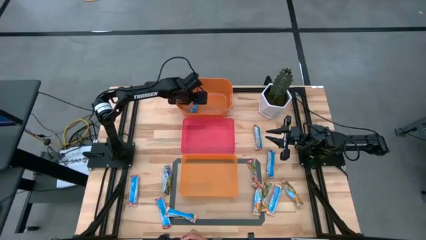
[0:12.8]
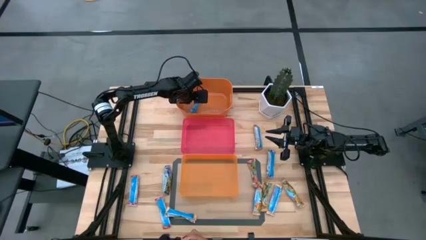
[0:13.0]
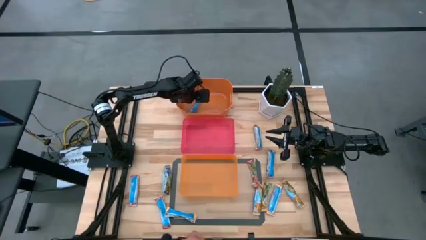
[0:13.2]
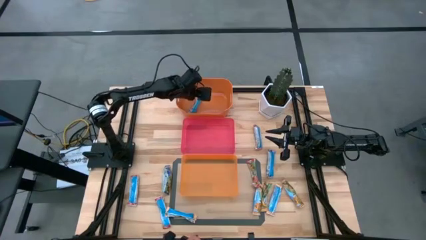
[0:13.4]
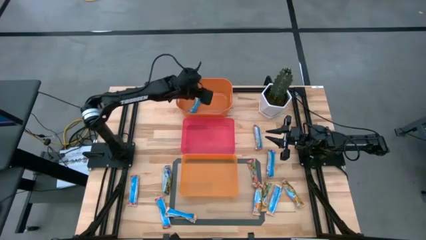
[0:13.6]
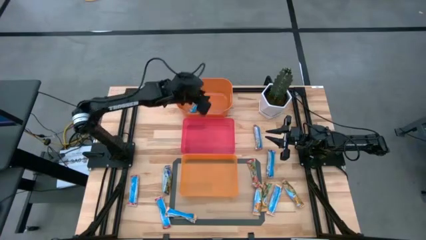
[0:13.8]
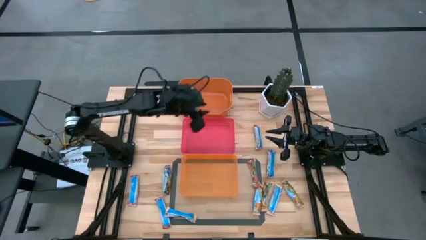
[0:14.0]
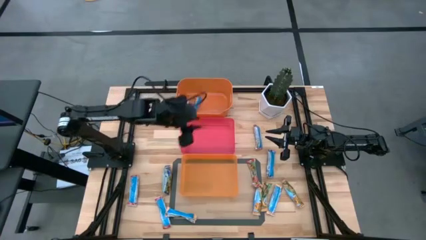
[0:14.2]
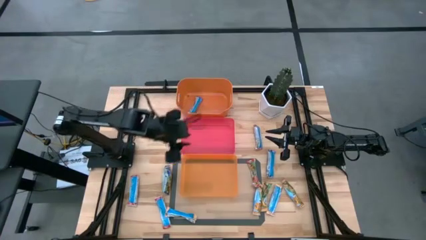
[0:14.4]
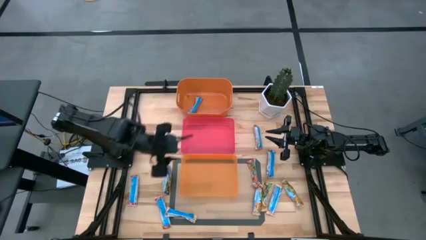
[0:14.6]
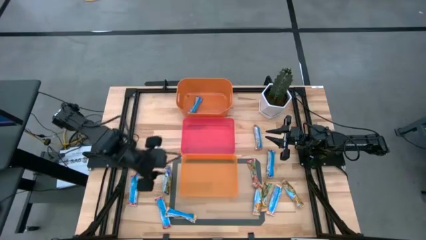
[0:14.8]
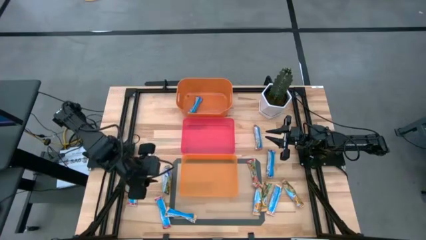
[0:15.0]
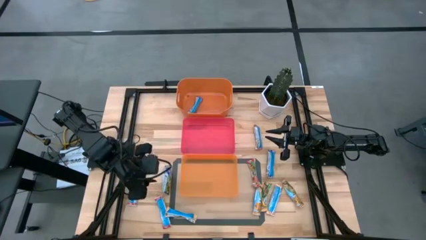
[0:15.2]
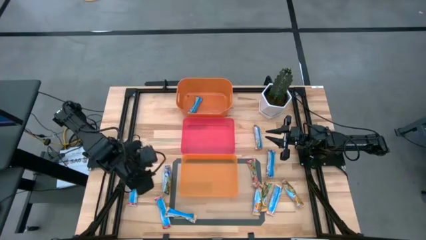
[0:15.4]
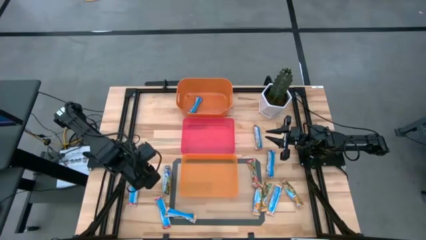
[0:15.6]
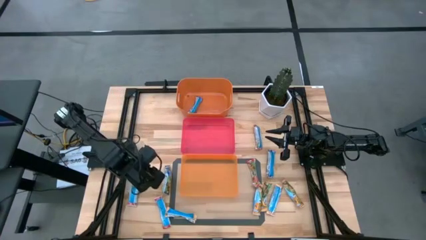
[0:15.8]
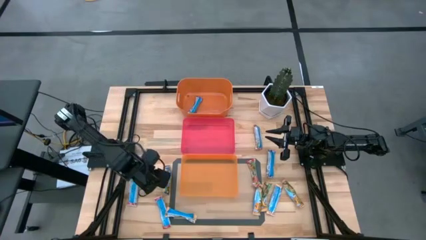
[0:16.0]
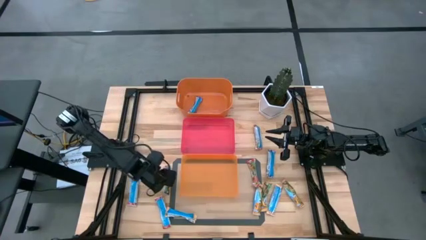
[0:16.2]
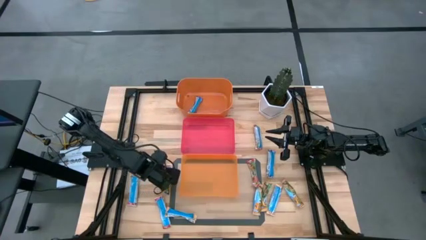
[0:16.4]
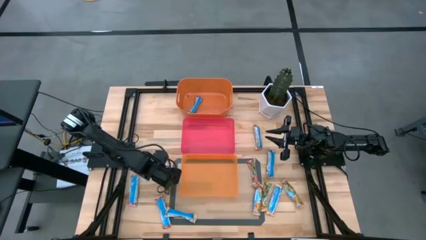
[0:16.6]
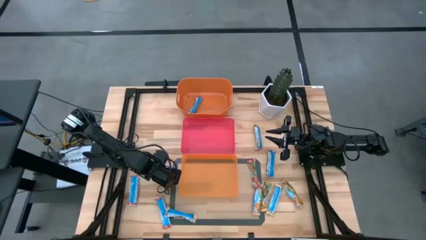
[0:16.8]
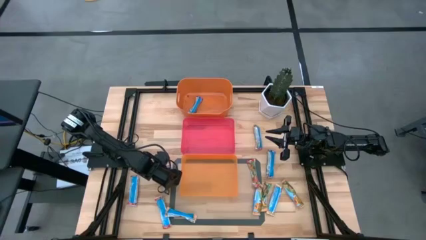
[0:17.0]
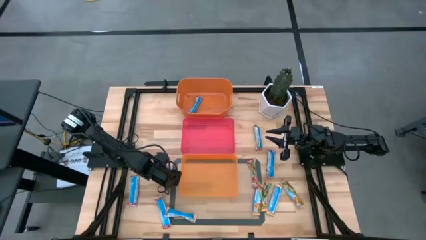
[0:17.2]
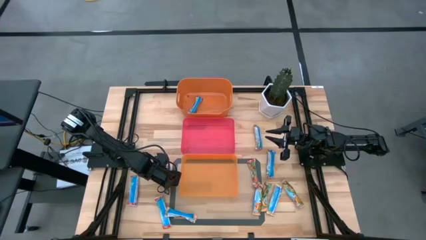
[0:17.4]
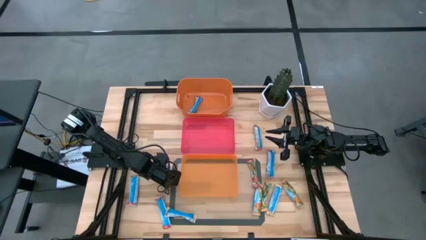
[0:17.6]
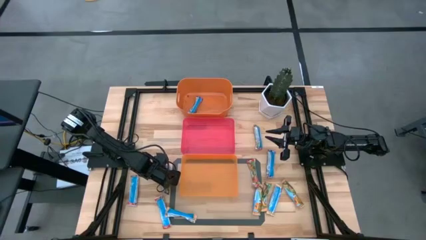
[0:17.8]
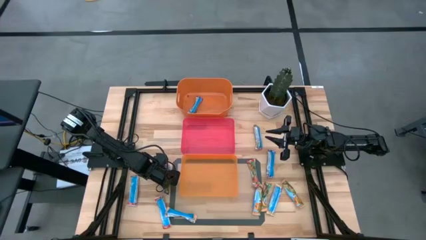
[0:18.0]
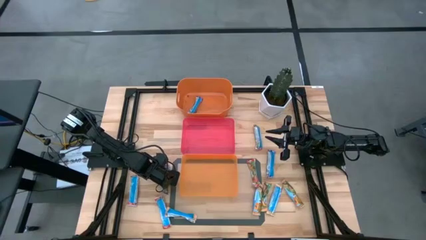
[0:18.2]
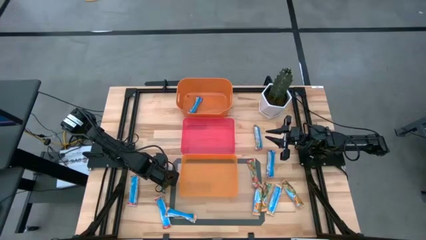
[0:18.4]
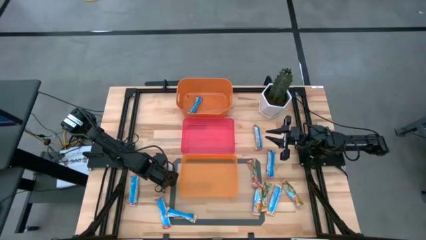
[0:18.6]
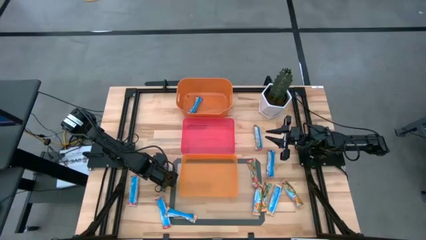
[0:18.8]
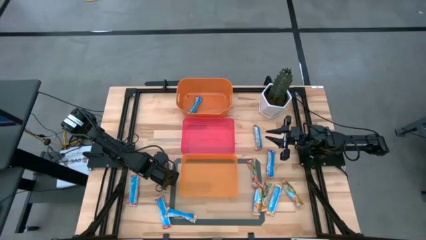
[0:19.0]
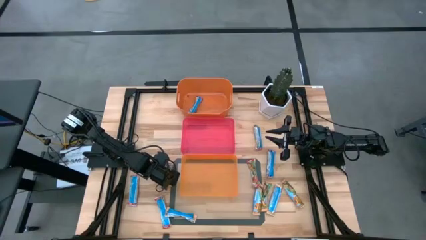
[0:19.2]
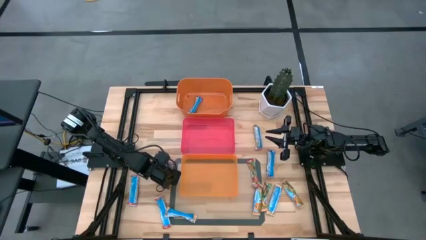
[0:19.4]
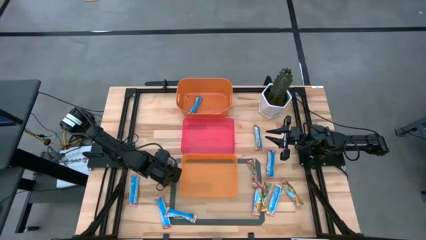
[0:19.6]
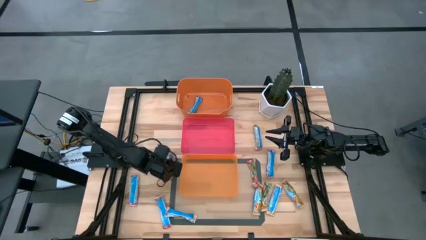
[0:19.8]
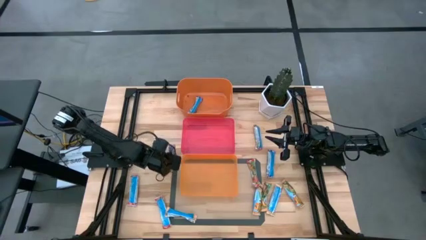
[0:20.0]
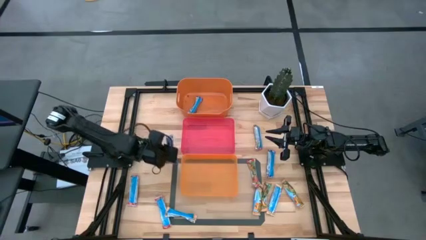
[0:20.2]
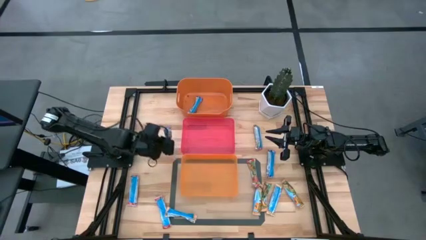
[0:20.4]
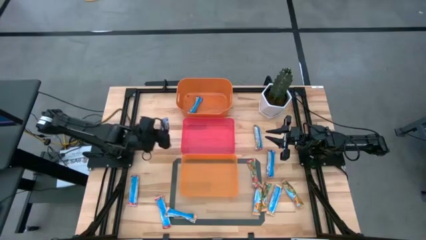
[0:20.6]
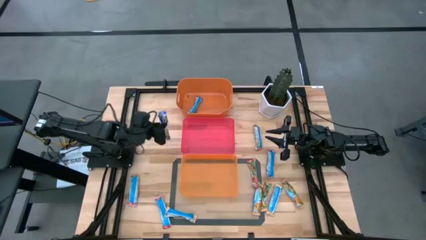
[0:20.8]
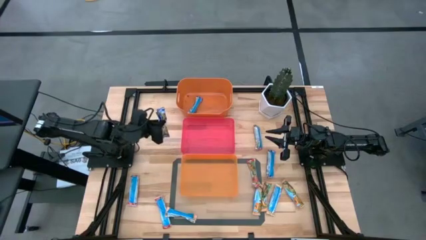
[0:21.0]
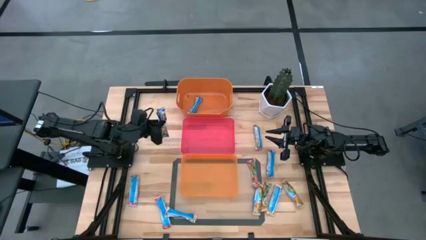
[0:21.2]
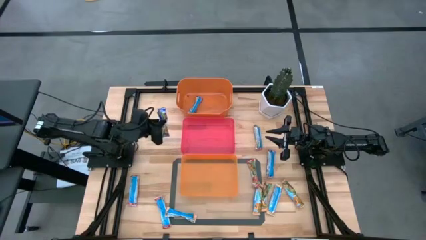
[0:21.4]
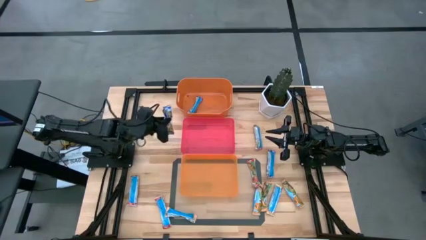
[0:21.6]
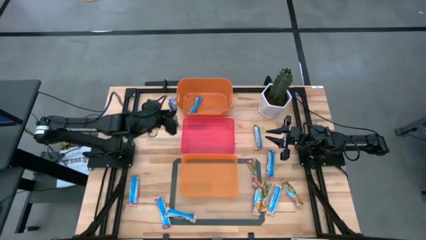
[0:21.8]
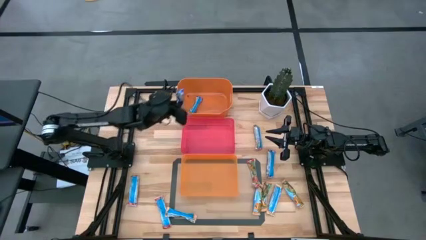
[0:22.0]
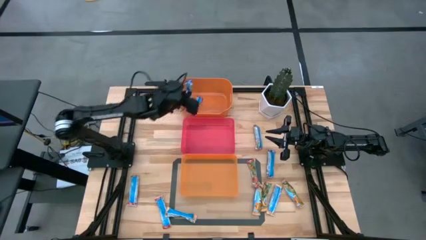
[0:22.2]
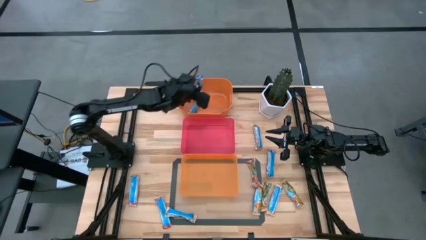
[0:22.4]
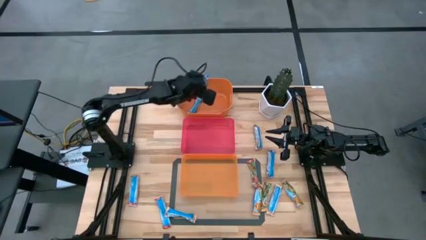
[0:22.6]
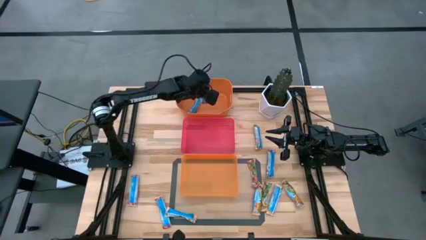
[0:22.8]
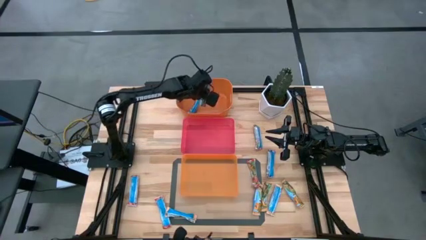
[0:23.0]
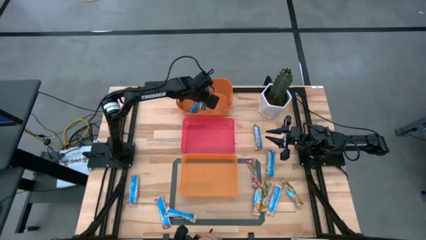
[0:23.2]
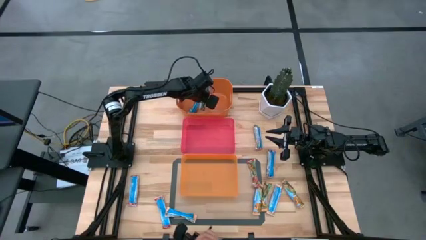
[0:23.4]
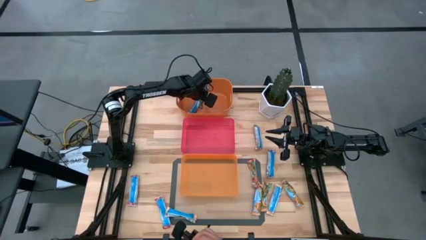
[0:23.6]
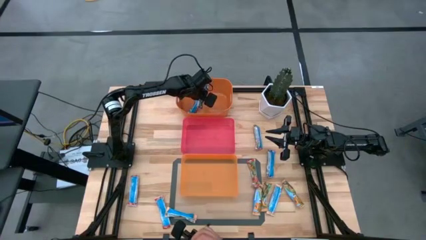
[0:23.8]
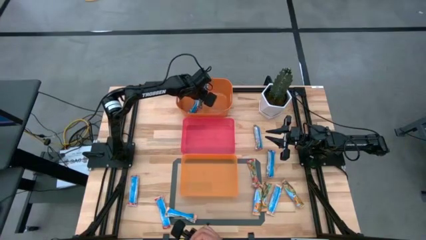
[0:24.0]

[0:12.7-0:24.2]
Task: Pick and place Granola Bars by type
Put the blue granola bar into the top orange bin

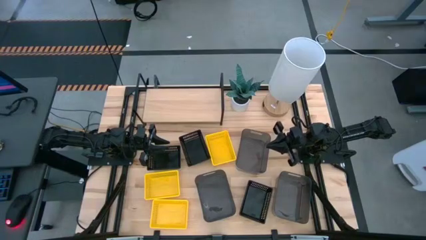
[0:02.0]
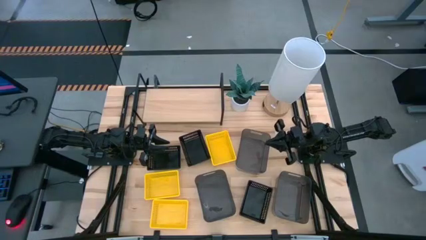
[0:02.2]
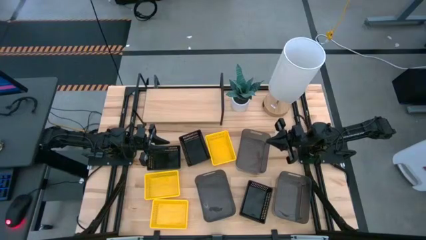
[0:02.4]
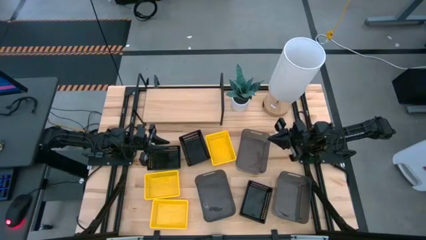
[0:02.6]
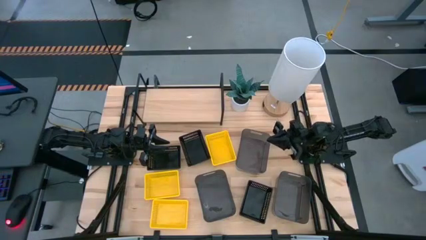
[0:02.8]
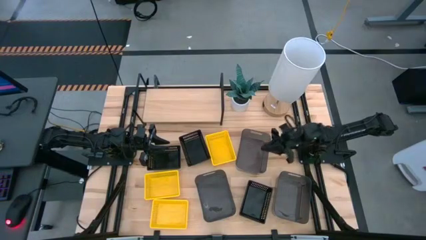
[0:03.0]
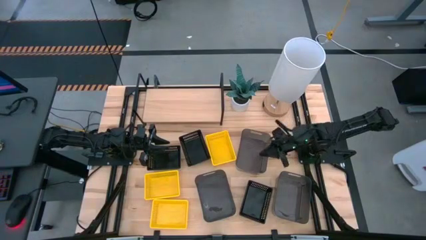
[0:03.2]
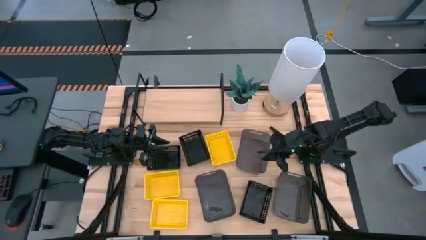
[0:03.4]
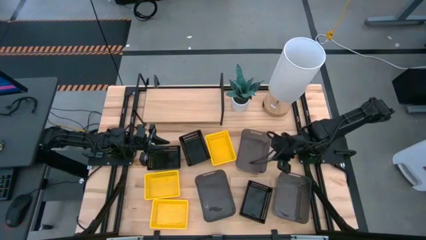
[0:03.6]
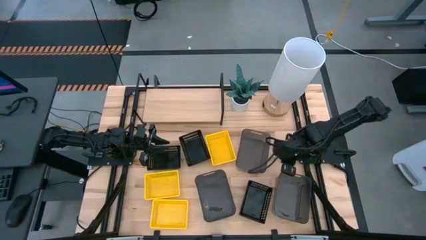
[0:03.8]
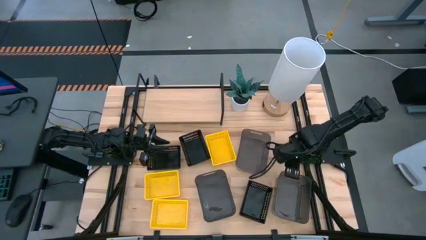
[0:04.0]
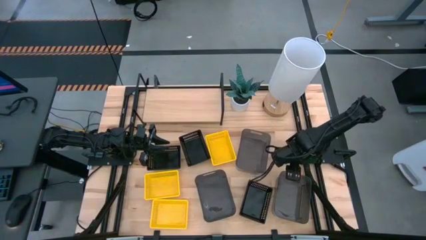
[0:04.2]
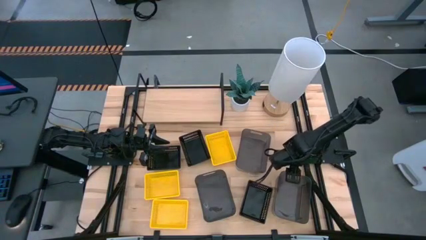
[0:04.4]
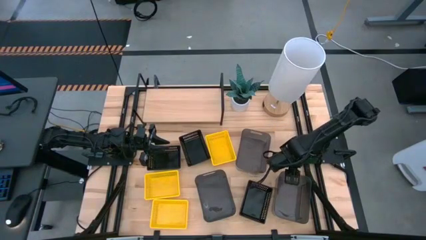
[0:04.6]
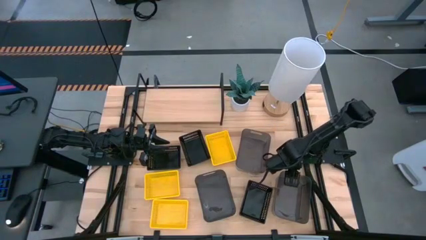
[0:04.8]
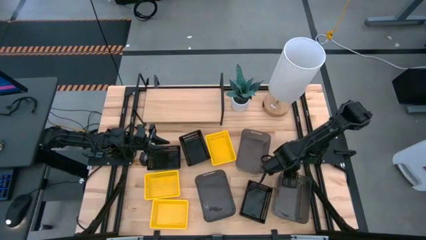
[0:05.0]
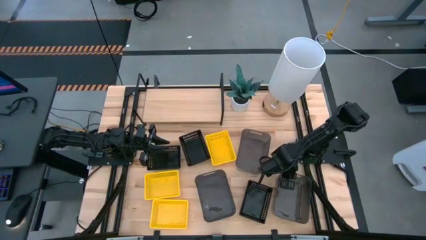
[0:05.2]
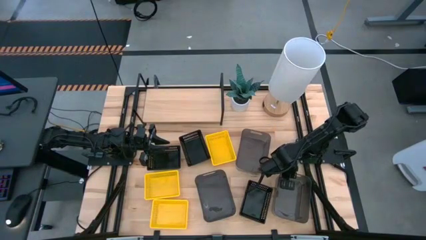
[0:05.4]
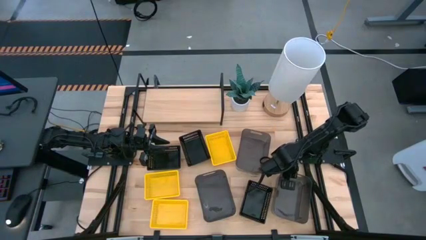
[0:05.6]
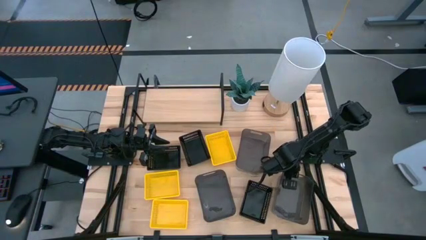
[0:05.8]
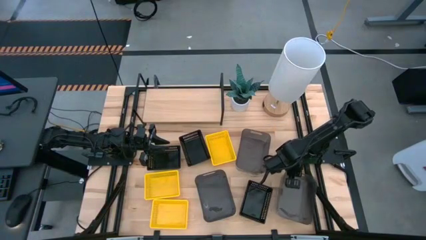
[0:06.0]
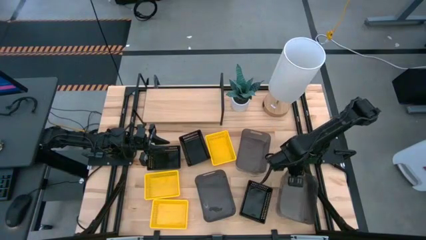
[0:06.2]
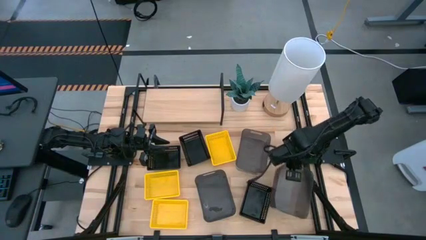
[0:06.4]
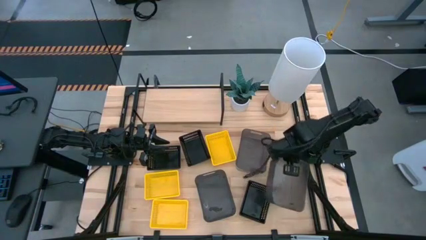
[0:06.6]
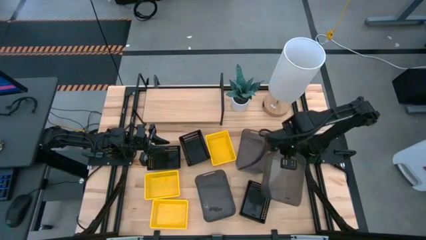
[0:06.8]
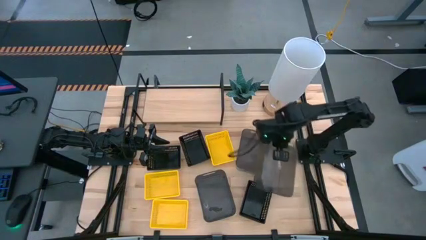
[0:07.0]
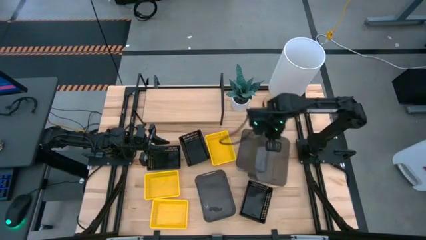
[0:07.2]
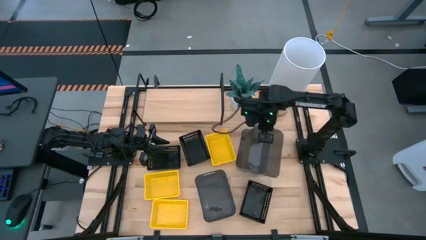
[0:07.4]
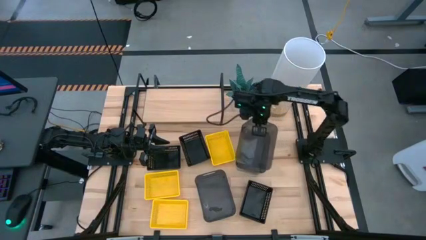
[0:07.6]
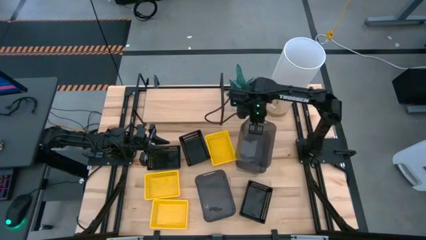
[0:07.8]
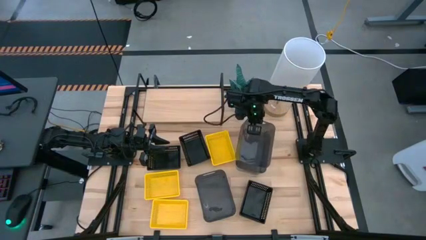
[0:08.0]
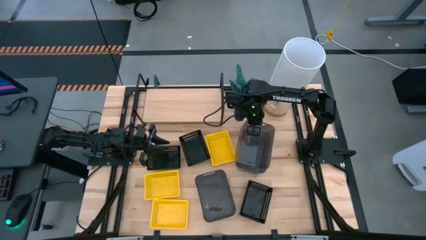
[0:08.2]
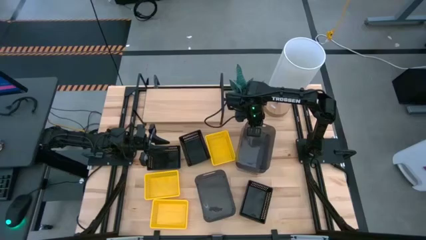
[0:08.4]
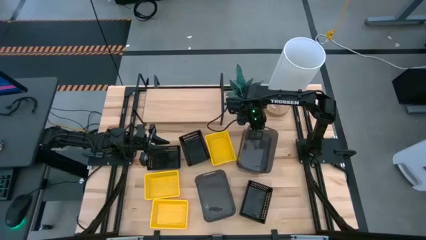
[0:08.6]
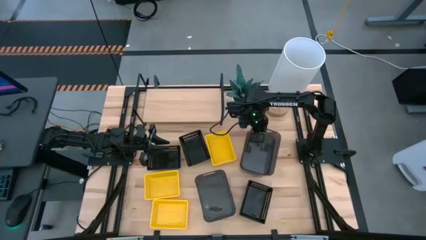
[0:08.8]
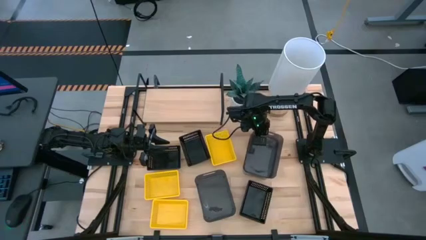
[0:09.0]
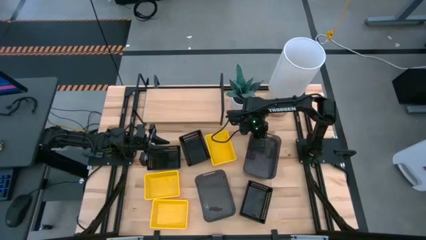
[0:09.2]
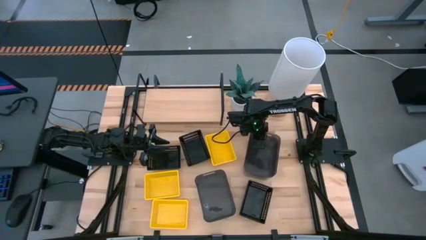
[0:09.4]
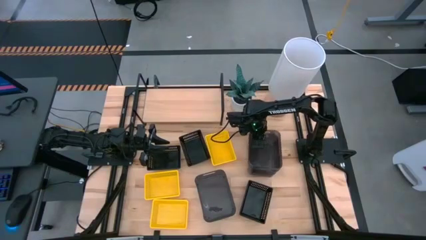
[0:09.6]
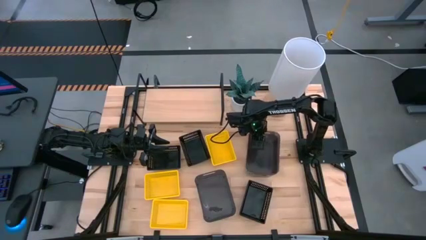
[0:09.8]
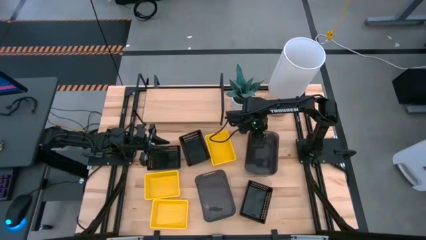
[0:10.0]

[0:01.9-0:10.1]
Task: Stack baskets on shelf by color
Stack the bottom right black transparent bin into the top right black transparent bin
